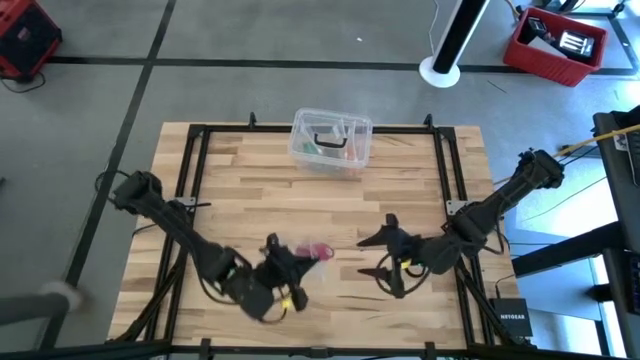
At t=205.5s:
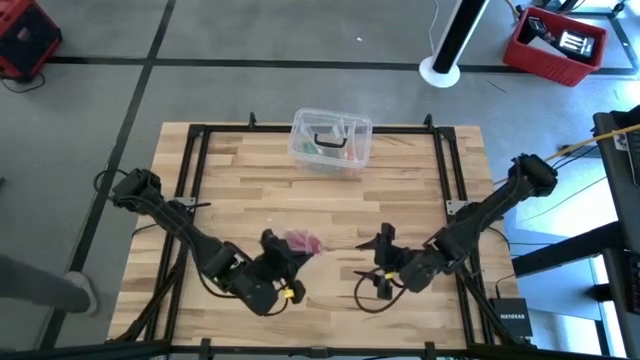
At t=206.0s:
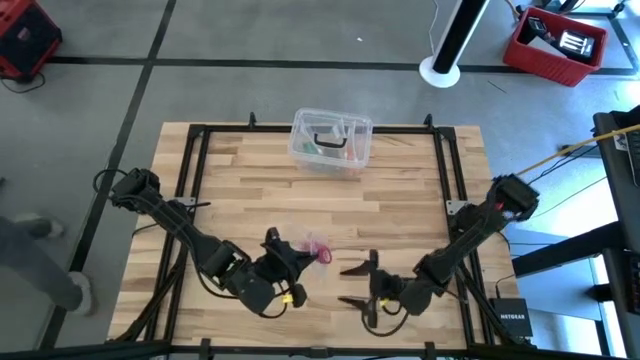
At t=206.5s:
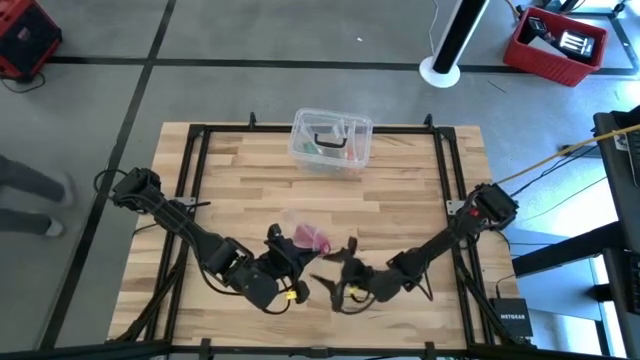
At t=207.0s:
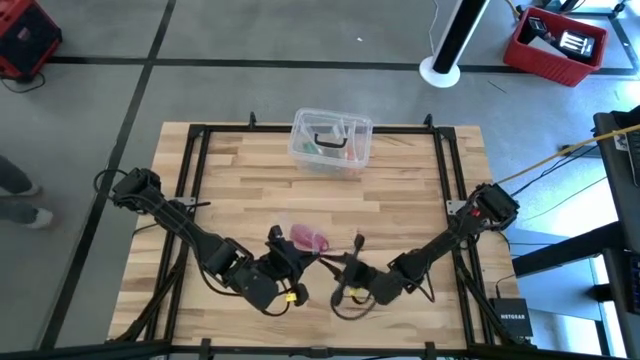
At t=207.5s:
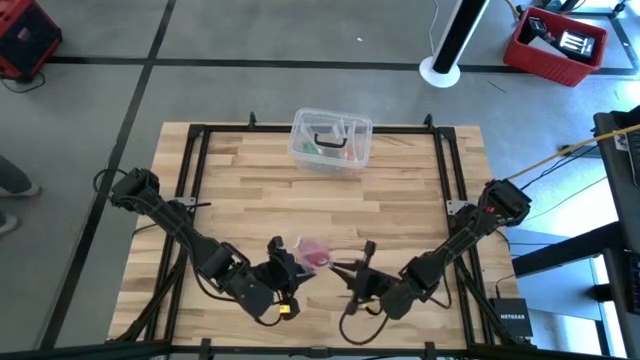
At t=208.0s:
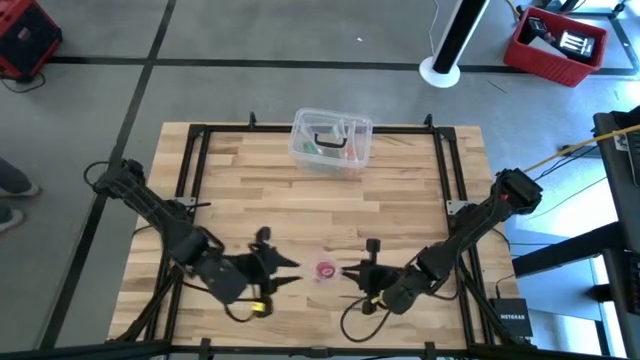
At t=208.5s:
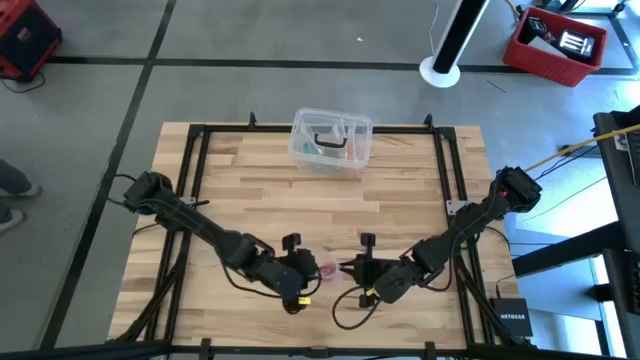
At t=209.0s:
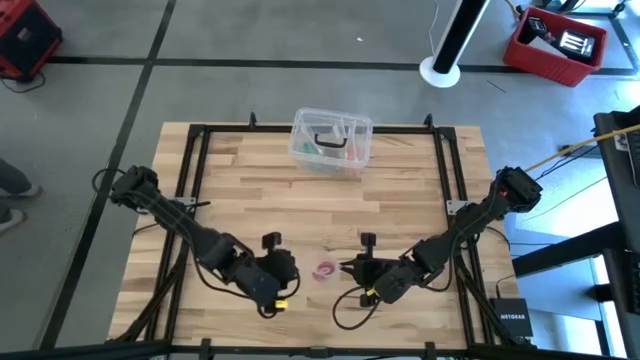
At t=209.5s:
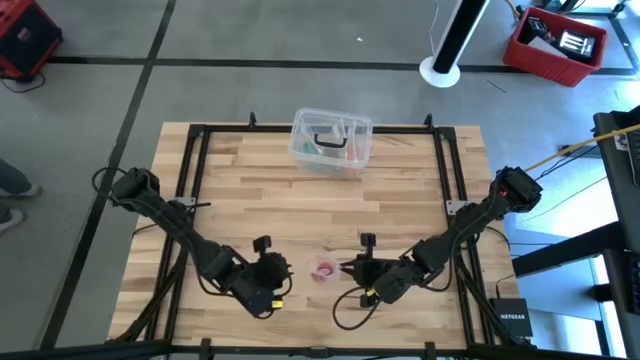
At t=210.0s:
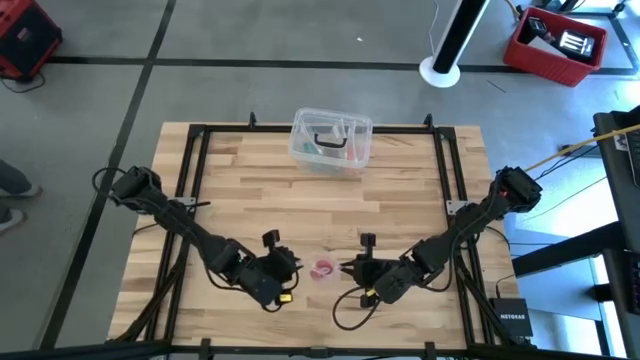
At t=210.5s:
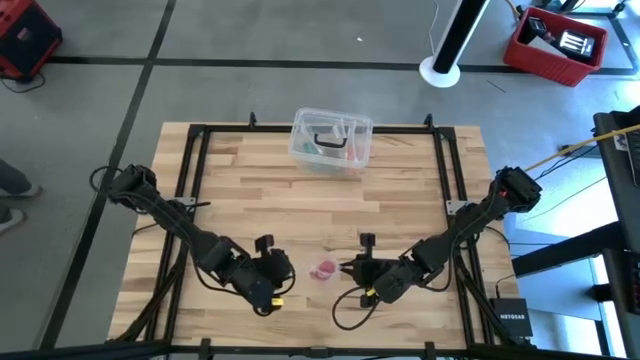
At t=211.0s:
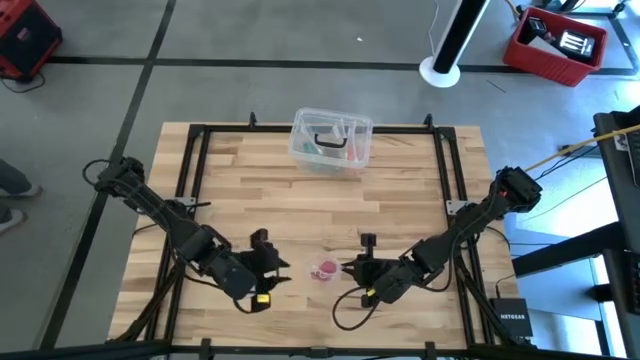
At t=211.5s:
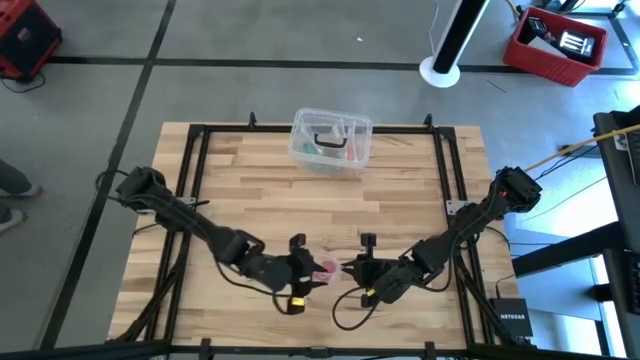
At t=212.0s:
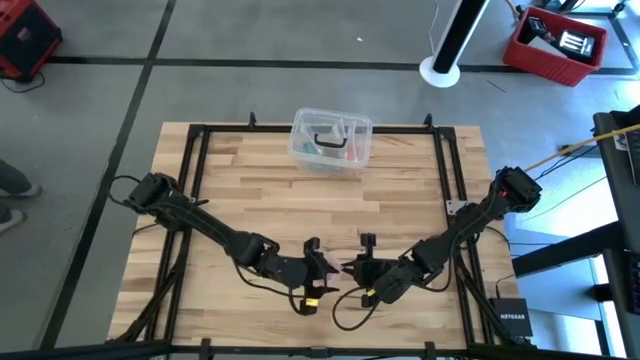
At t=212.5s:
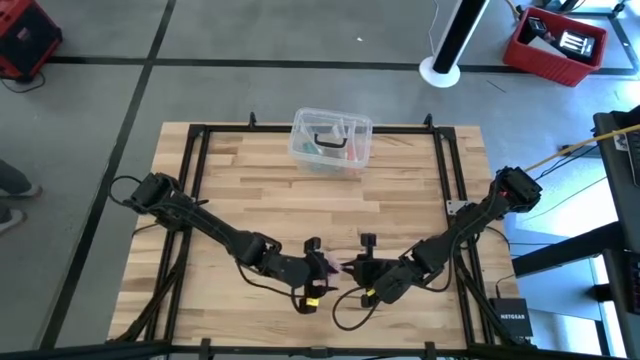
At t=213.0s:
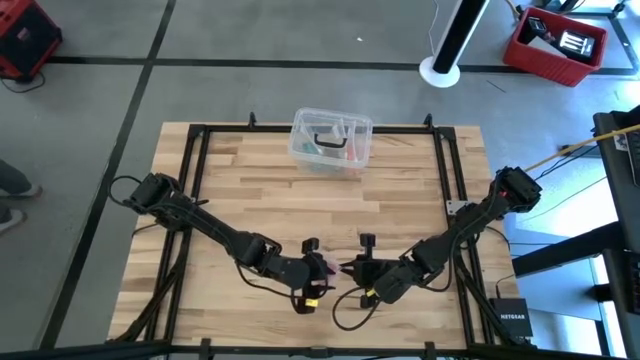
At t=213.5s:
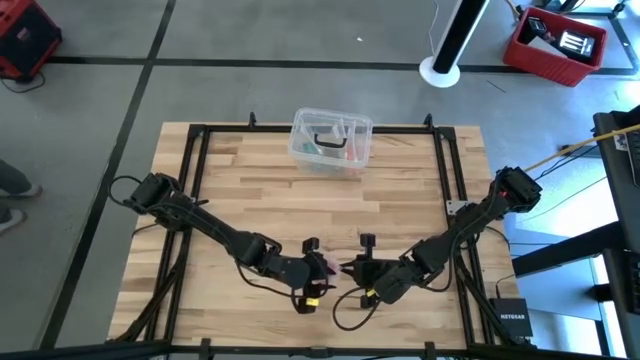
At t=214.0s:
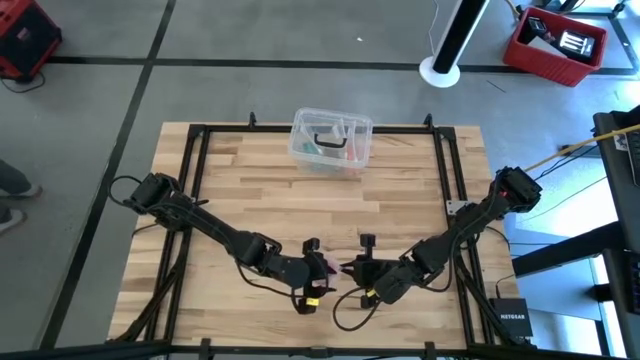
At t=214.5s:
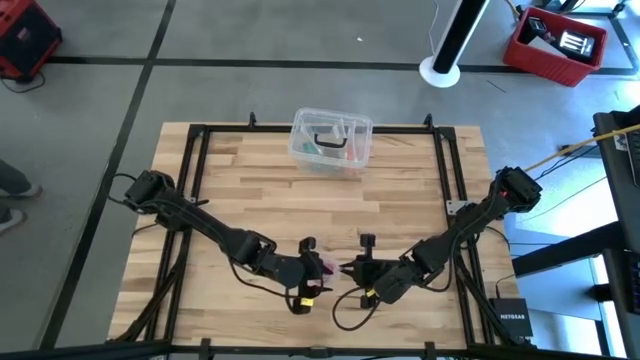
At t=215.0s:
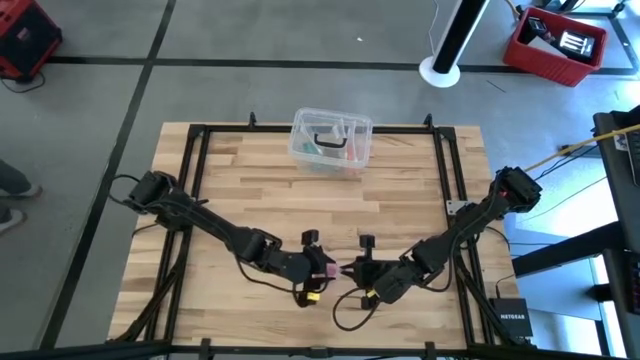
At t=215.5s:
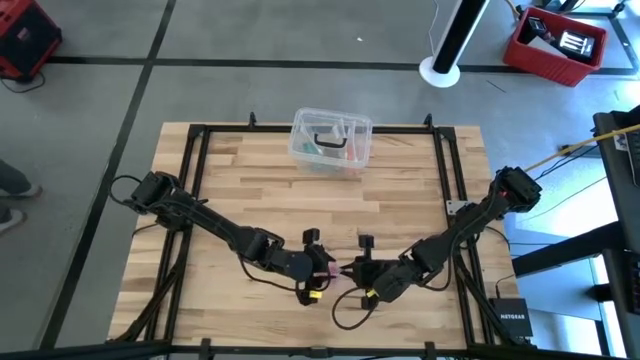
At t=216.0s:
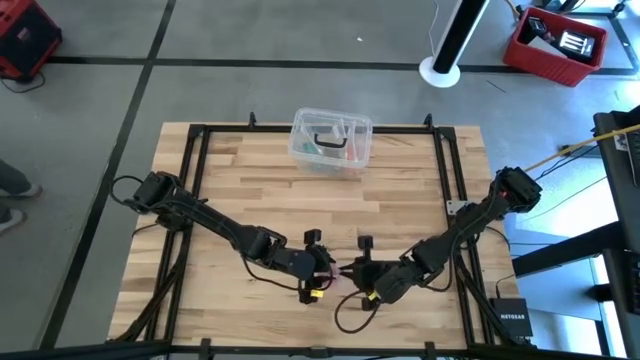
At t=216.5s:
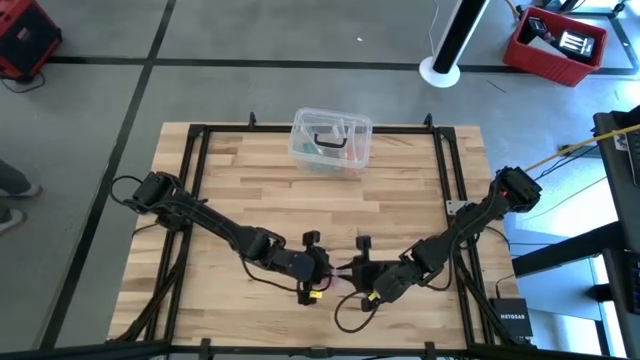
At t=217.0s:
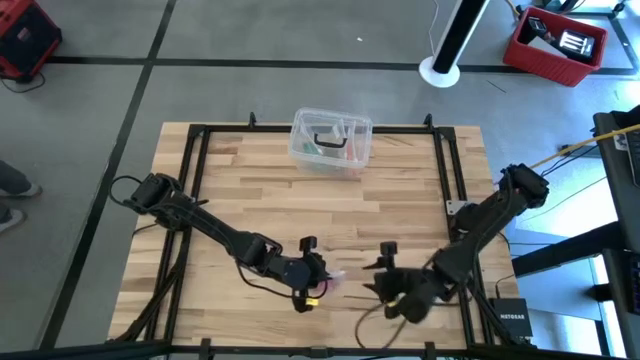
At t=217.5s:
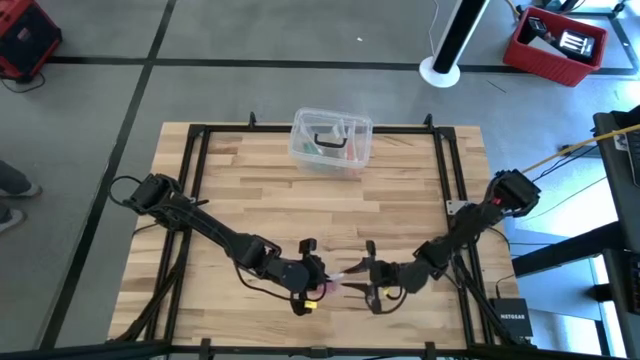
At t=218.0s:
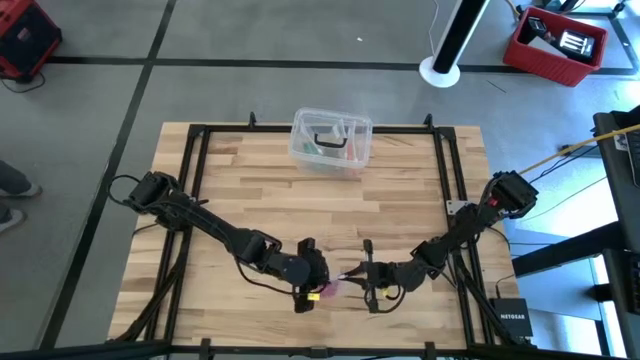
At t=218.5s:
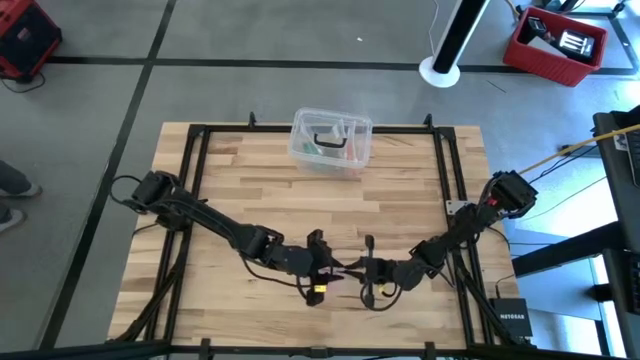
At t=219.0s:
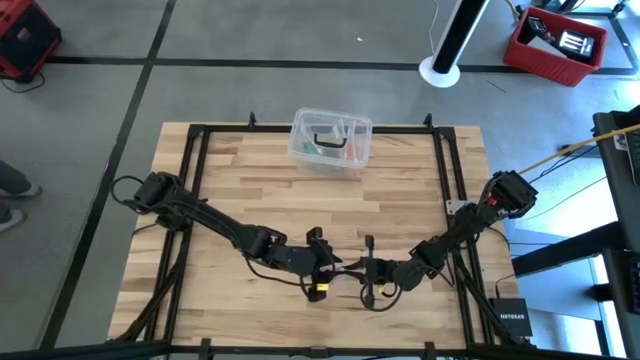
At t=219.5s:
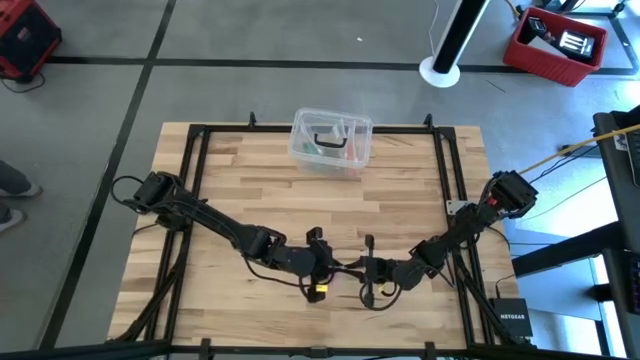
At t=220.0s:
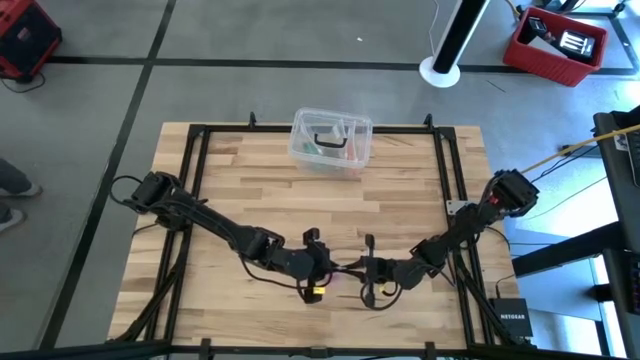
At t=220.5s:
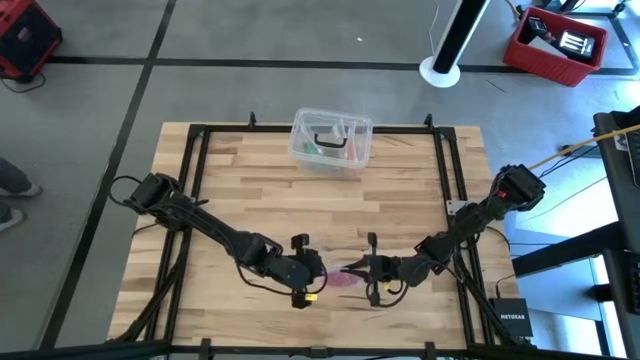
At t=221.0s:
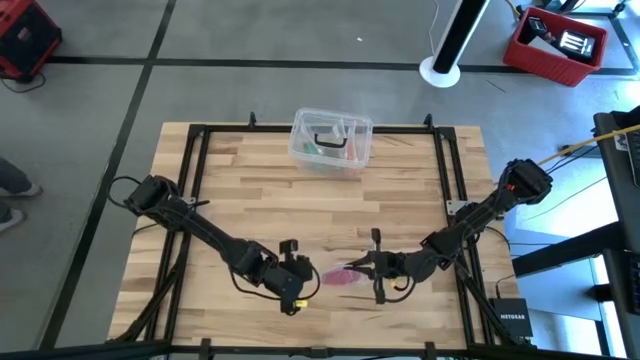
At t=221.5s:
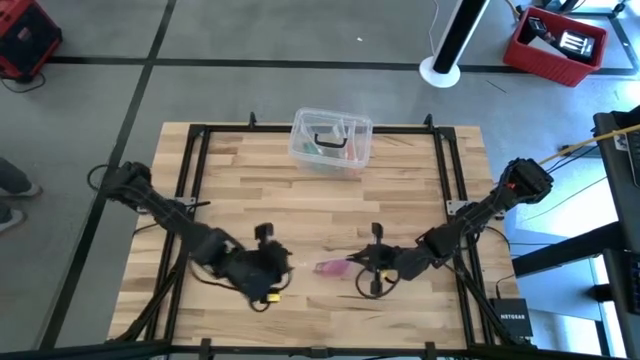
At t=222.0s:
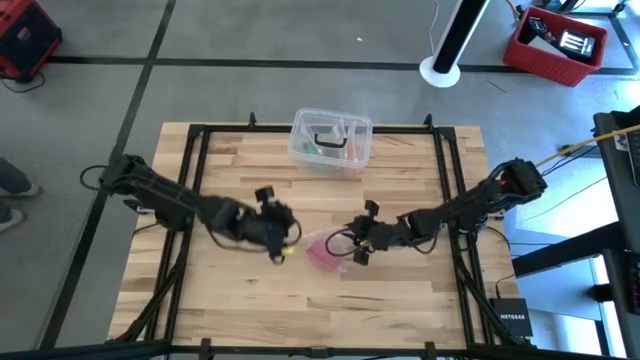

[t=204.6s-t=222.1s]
Task: Roll bandage
Close the transparent zip bag

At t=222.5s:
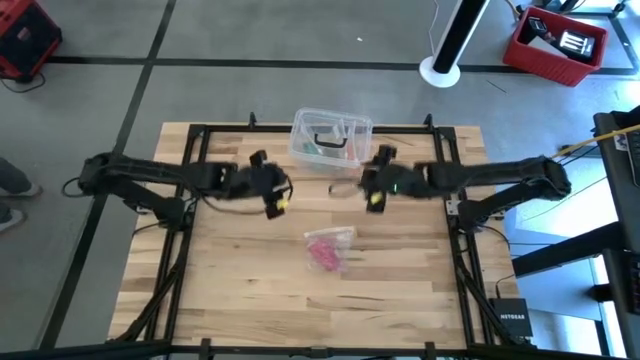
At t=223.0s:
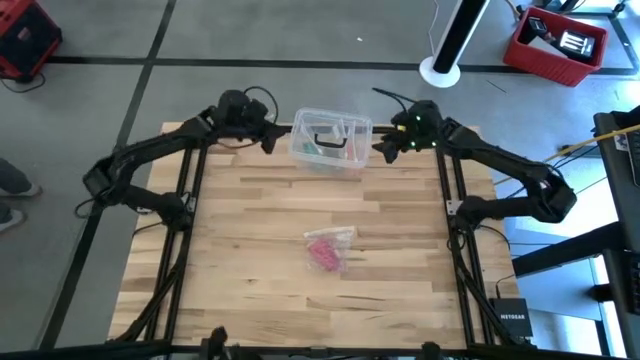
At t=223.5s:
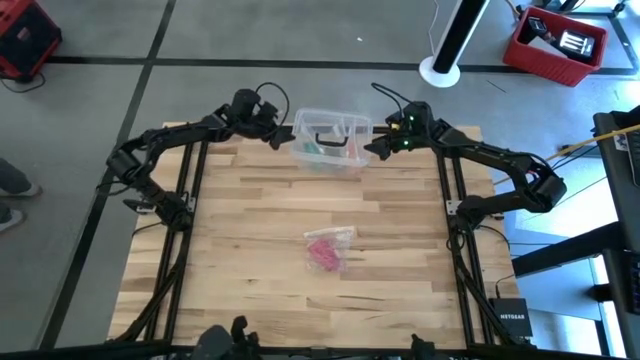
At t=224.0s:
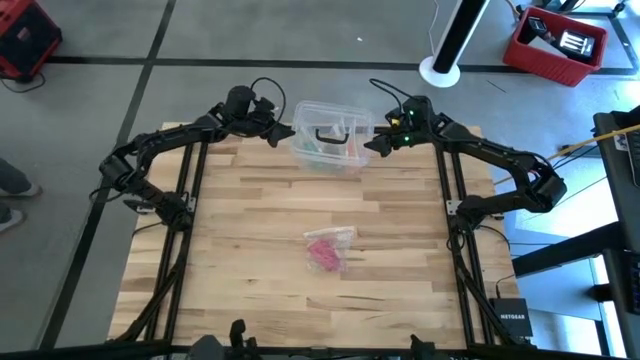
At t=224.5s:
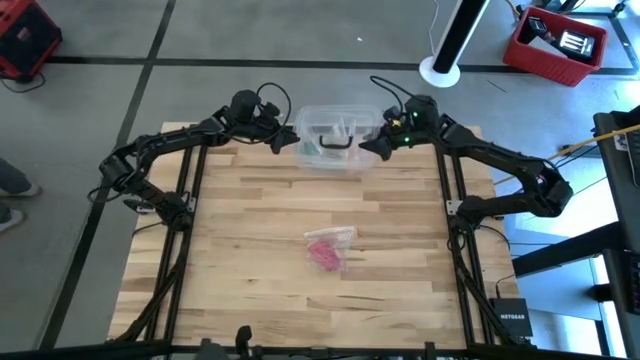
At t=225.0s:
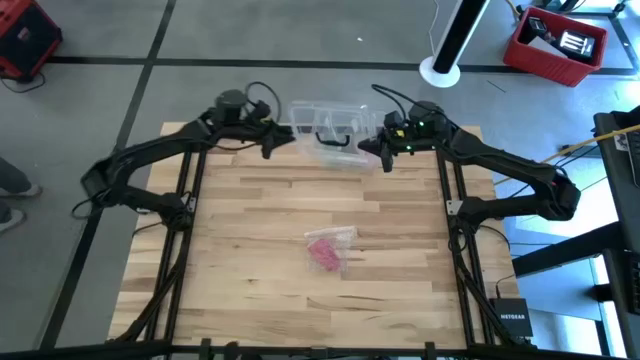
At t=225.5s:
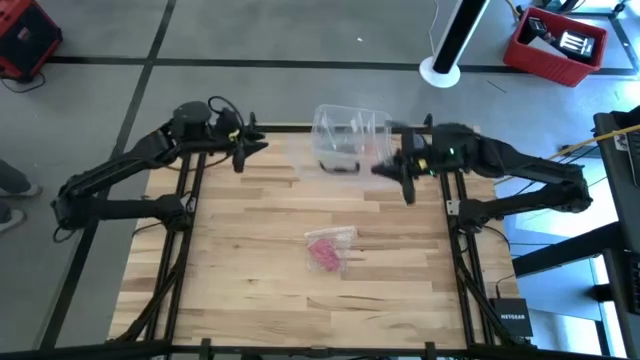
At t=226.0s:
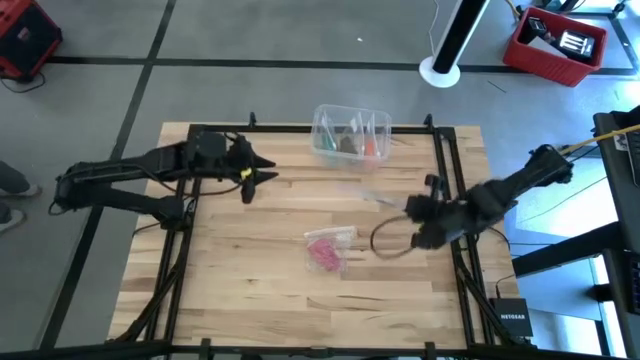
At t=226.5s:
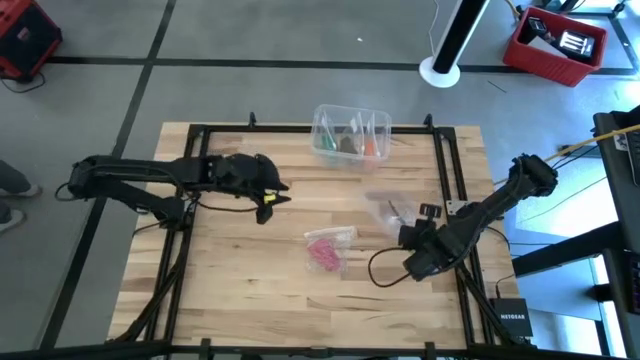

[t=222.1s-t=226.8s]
Open the transparent container
